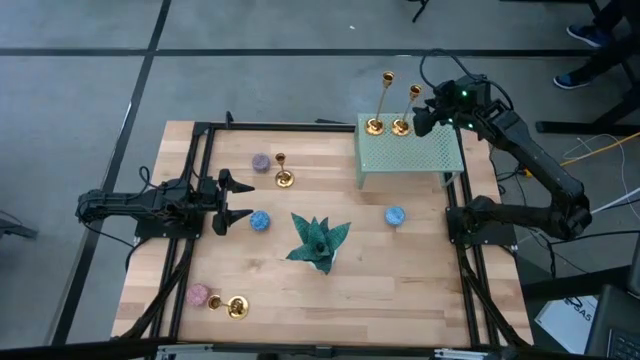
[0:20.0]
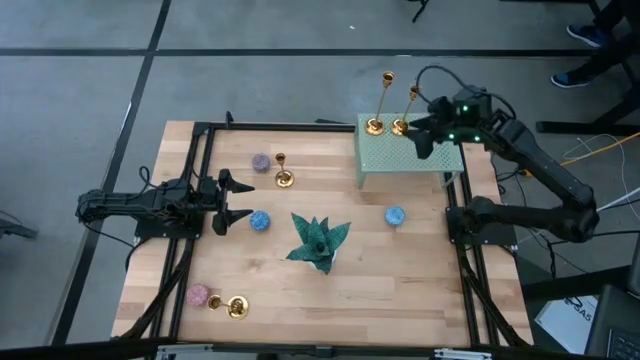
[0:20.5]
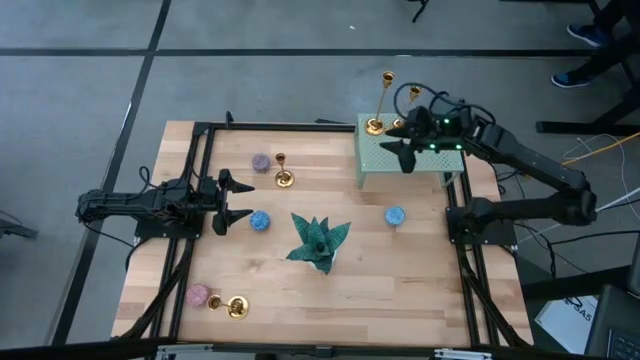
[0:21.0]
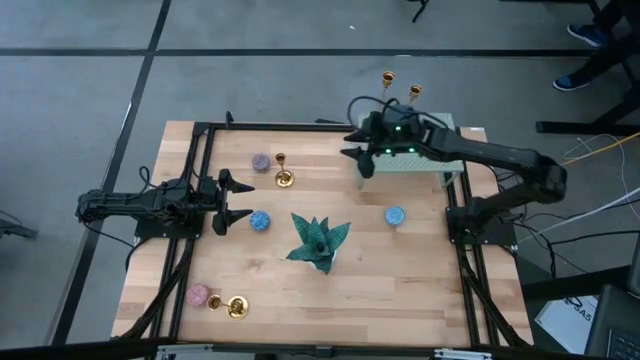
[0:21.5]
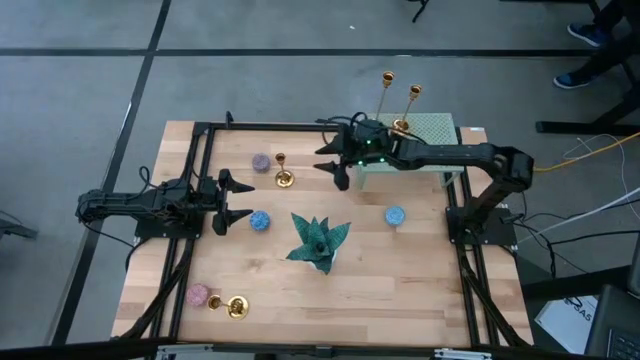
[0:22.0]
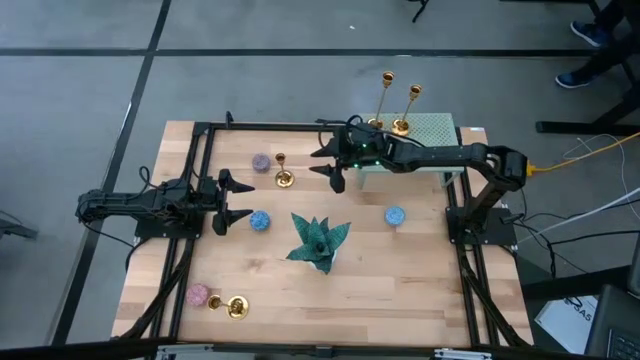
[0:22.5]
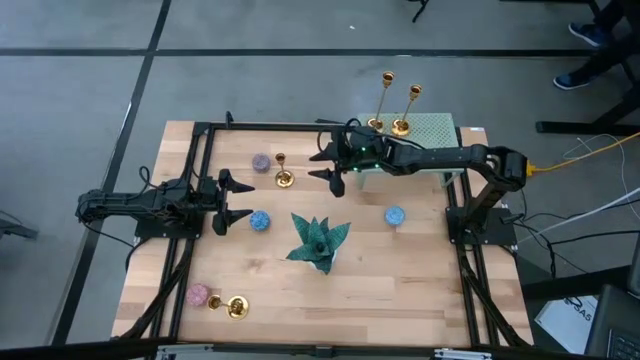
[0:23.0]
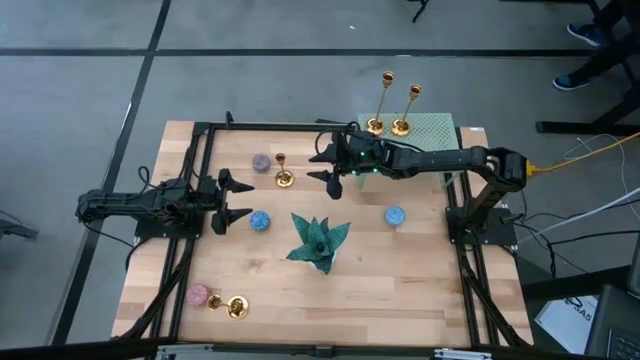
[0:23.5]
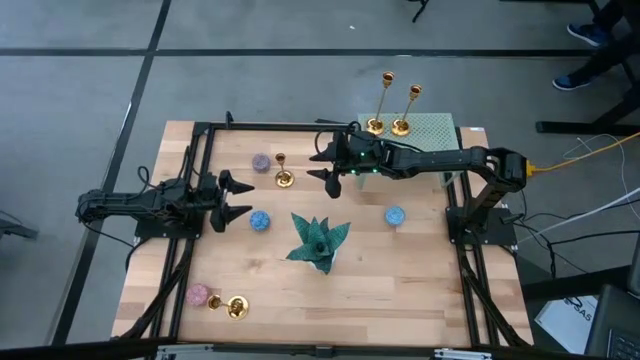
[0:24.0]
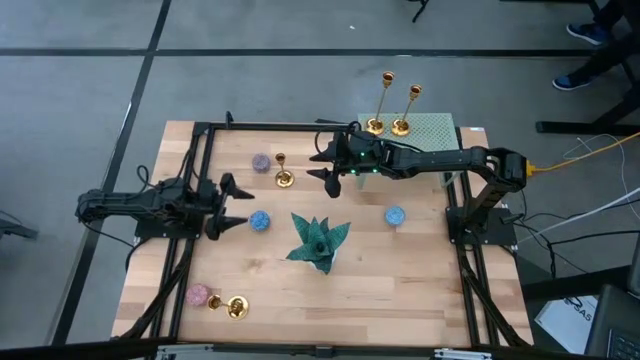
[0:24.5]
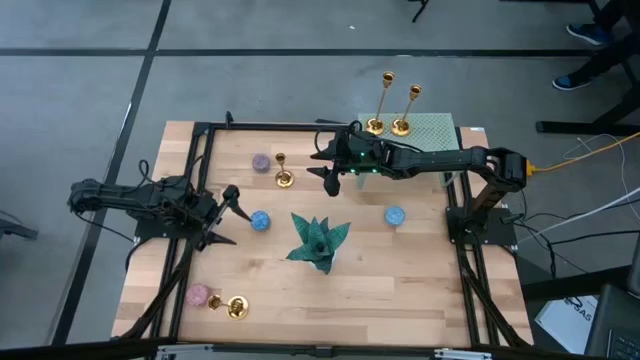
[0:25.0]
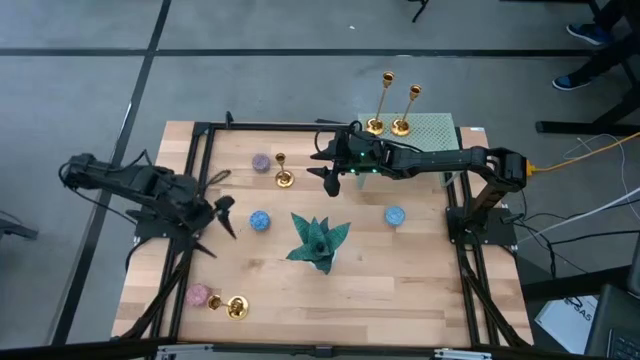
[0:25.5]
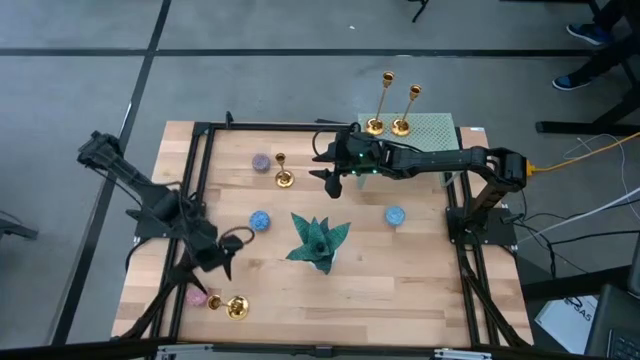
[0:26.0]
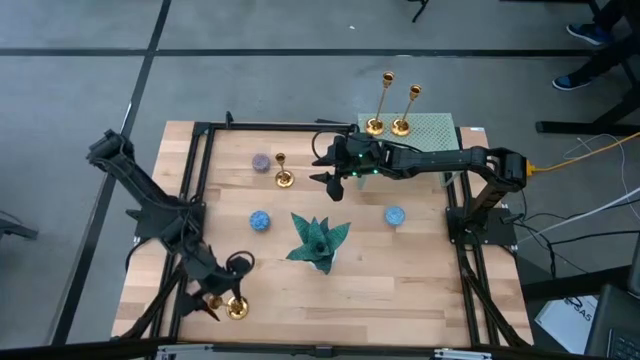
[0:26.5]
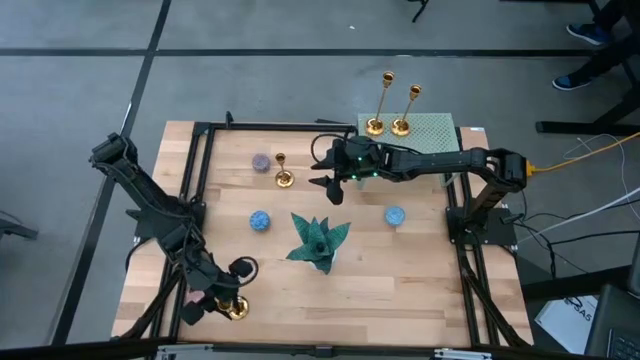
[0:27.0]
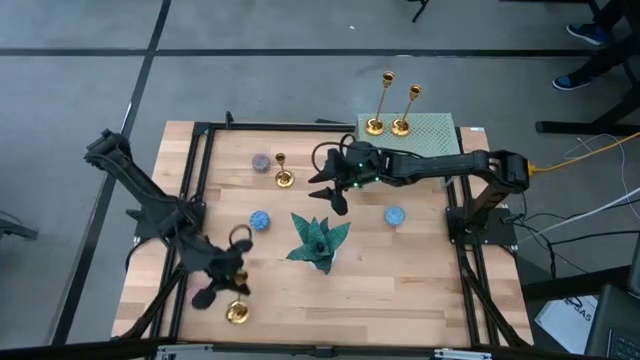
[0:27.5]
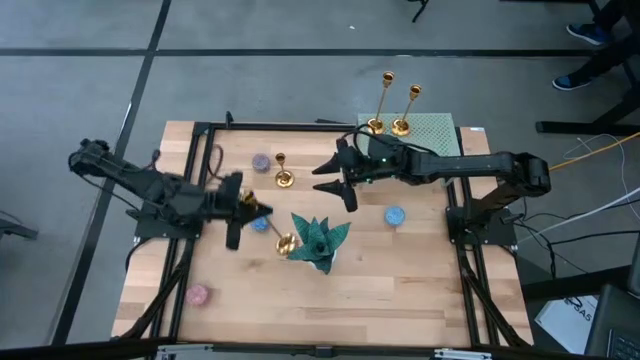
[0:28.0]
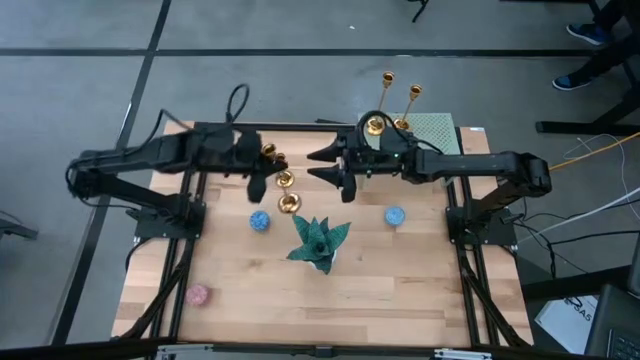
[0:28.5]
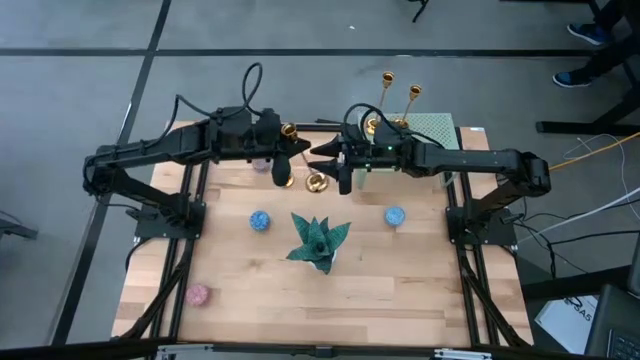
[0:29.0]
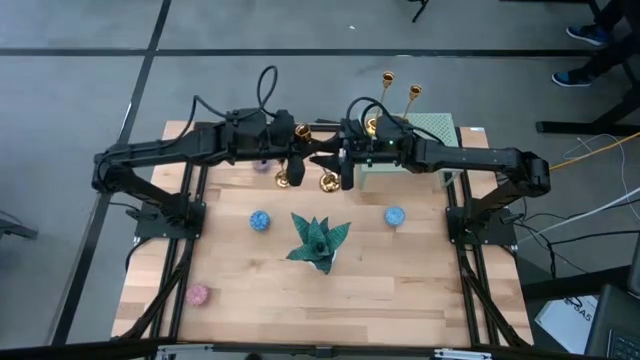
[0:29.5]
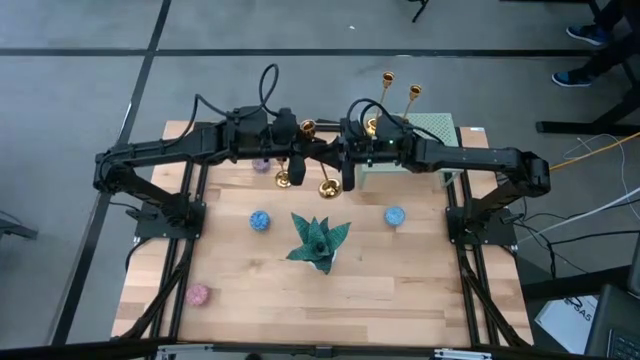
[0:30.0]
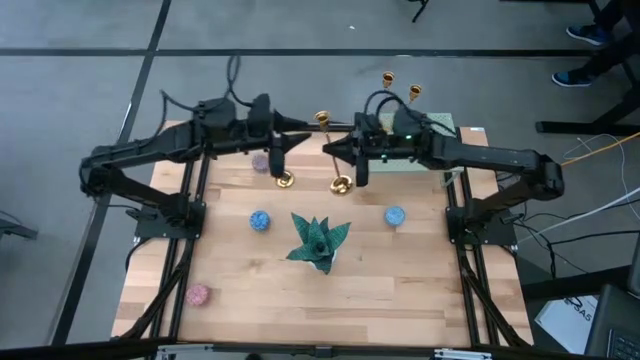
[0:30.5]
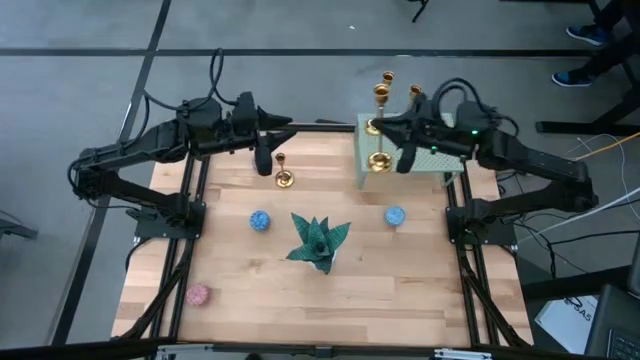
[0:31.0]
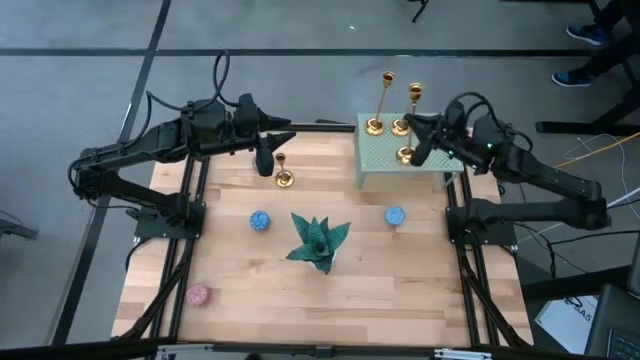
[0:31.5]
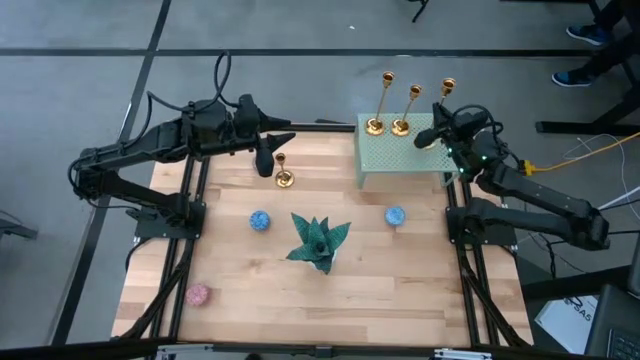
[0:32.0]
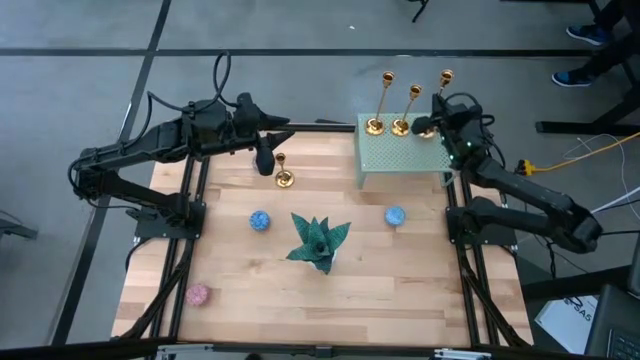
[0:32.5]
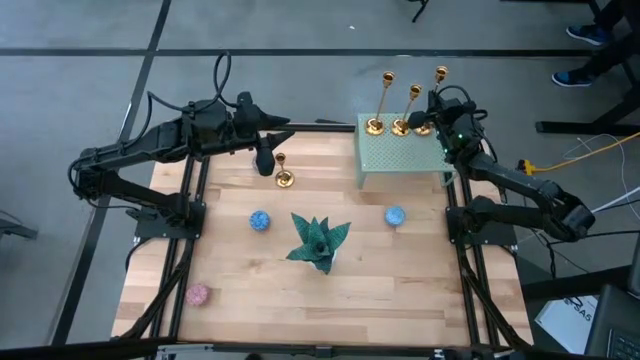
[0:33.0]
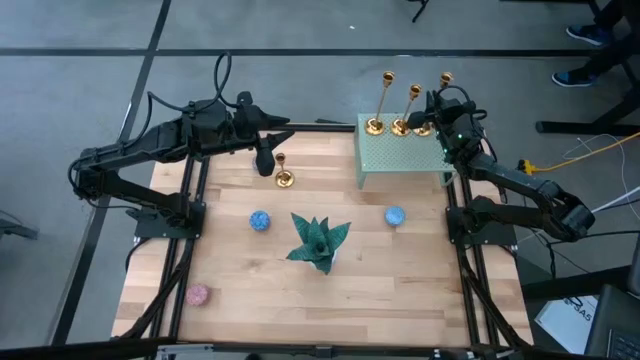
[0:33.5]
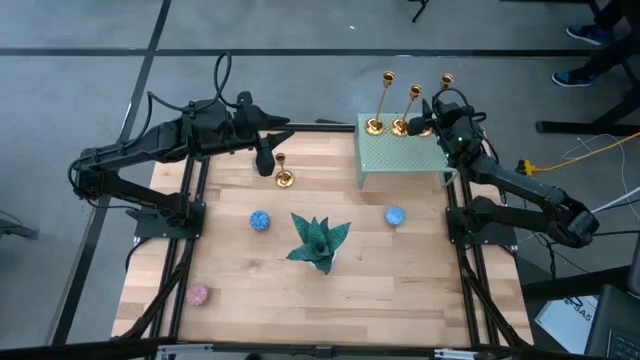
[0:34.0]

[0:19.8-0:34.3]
Task: Stock candles and holders on shelf
Align the gold candle holder with the other gold candle holders on the shelf

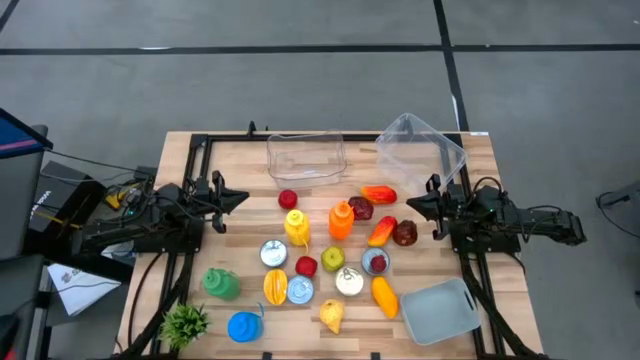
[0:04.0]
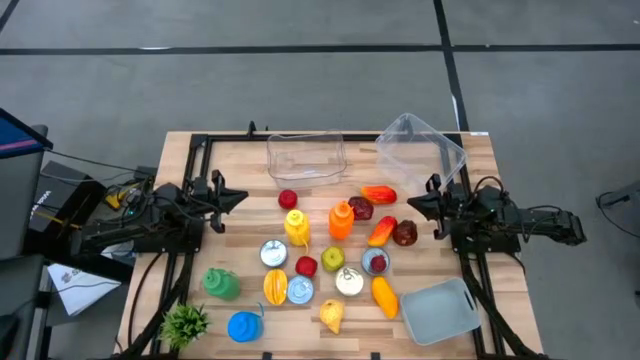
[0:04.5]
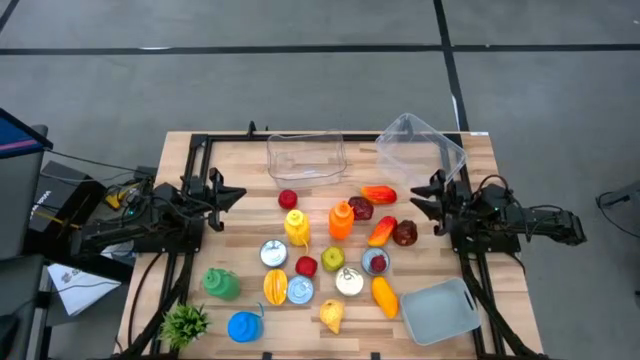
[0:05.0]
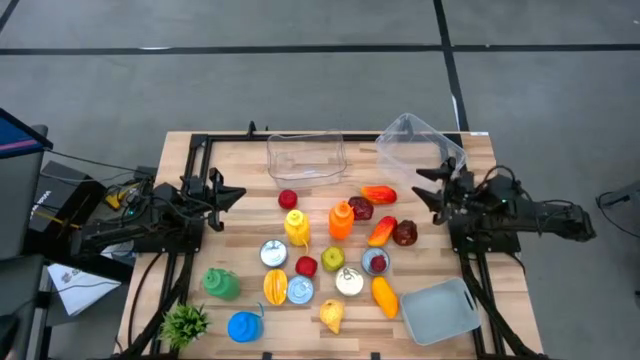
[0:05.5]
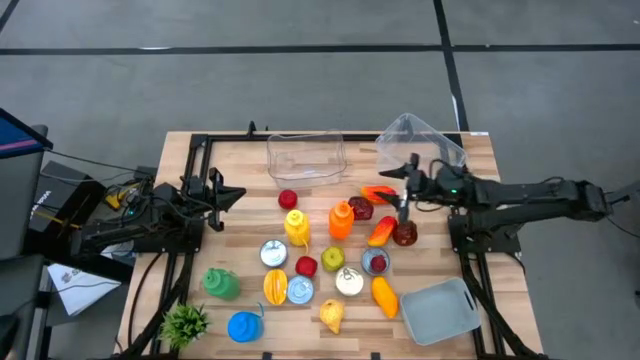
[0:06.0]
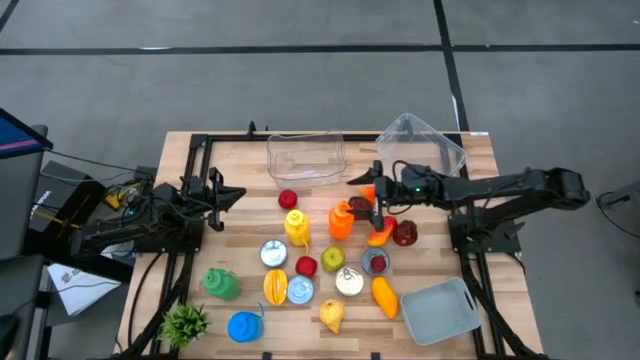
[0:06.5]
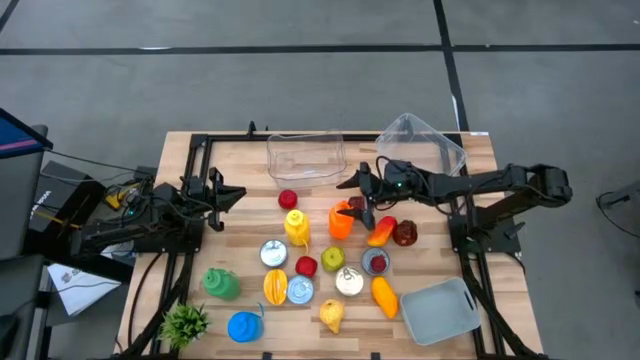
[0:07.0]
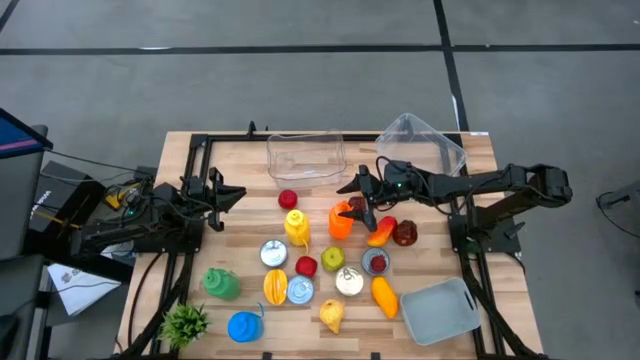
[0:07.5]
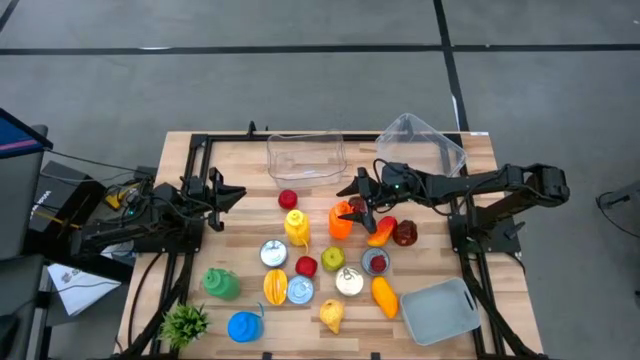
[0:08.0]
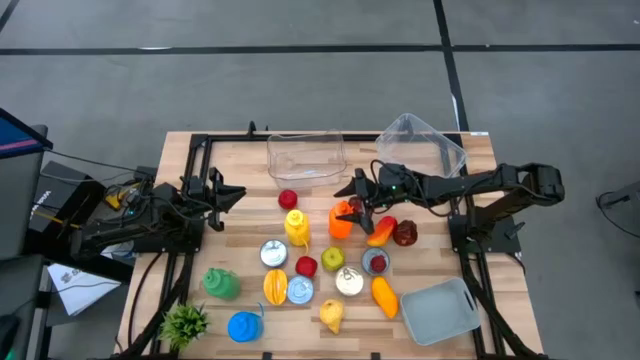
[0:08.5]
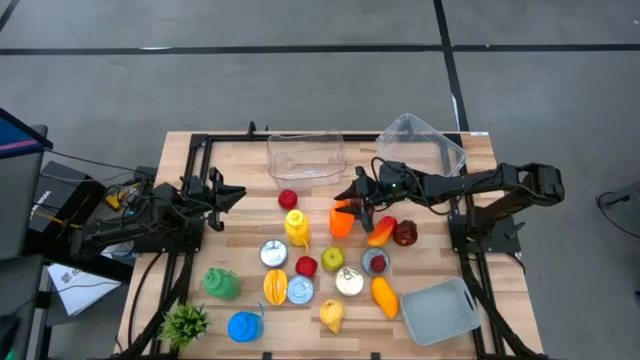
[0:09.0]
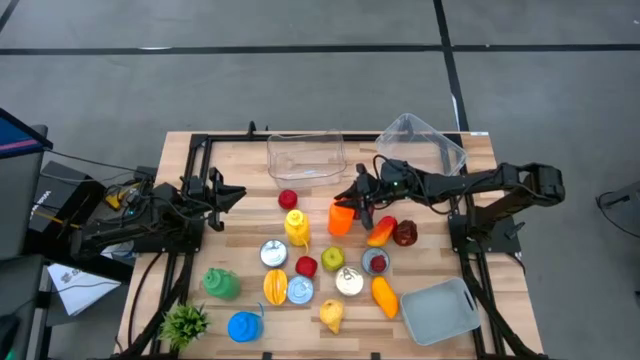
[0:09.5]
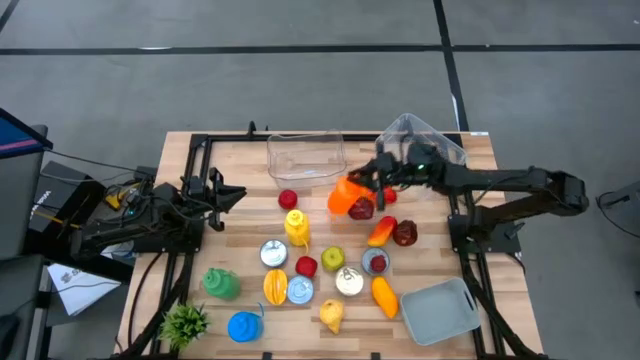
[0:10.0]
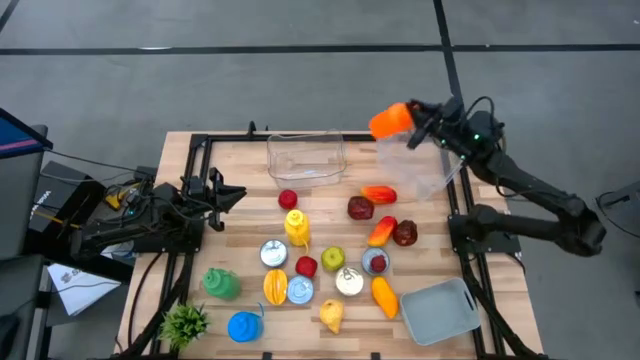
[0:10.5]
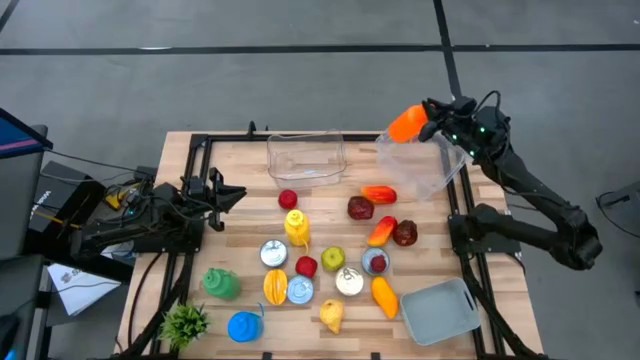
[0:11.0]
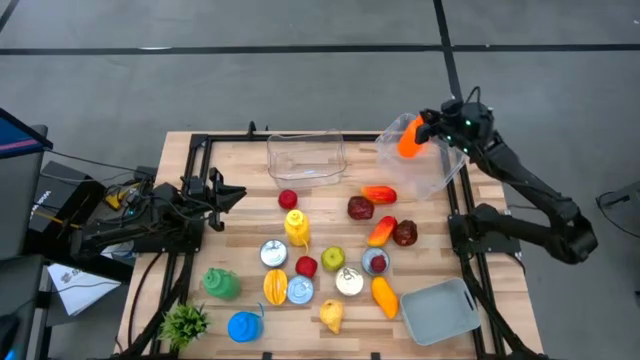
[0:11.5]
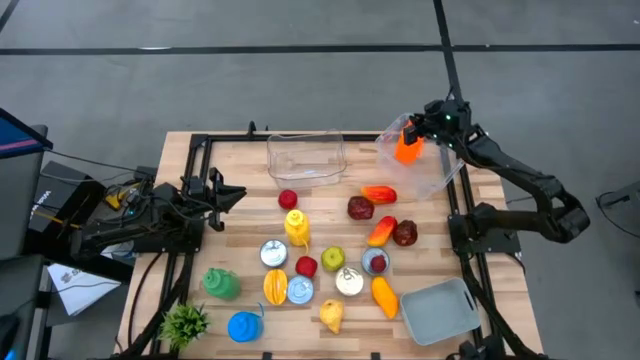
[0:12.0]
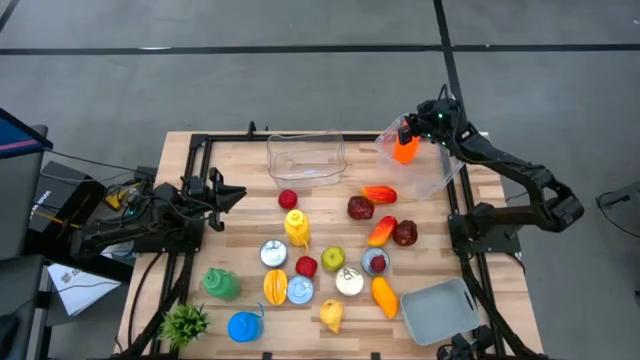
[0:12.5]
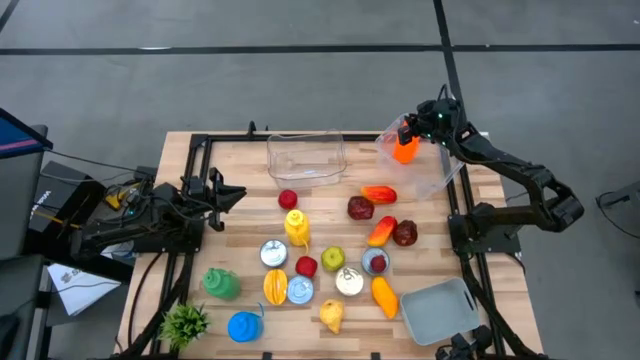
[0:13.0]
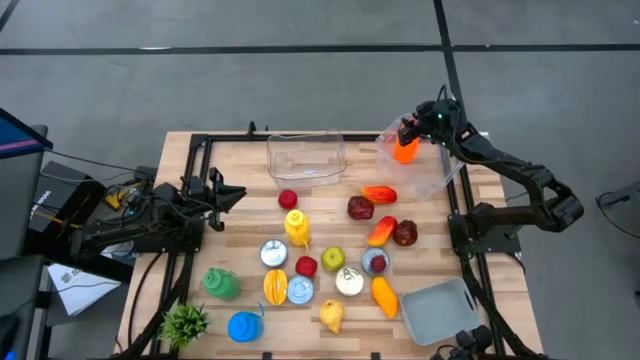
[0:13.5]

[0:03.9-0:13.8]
Task: Pick & Place Food Item
Put the orange water bottle into the transparent container
